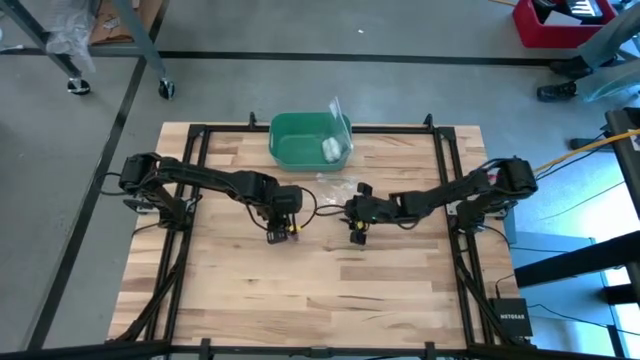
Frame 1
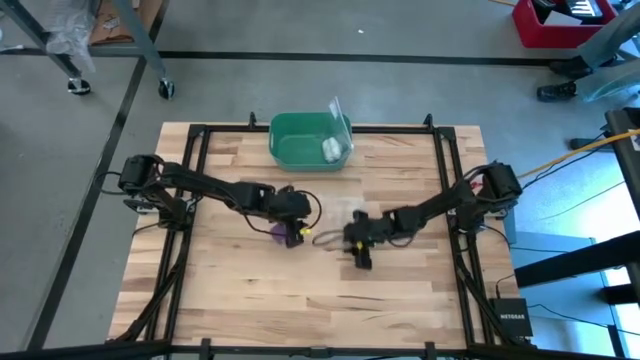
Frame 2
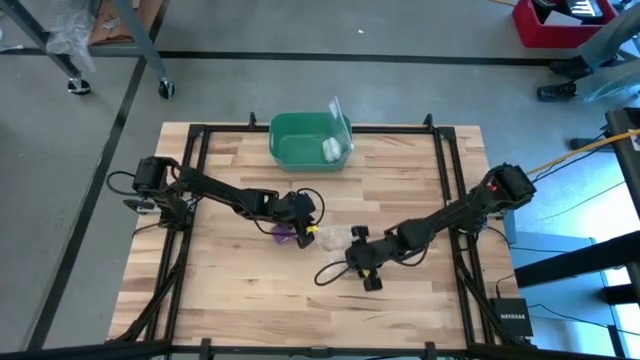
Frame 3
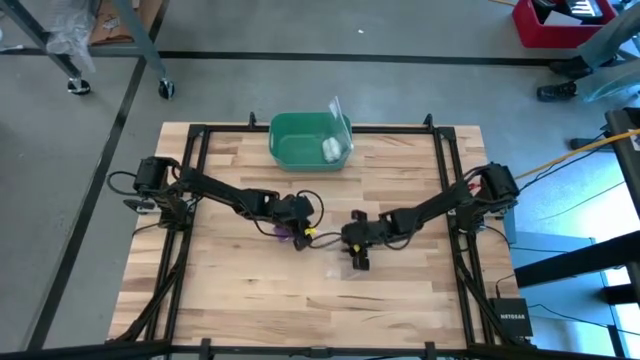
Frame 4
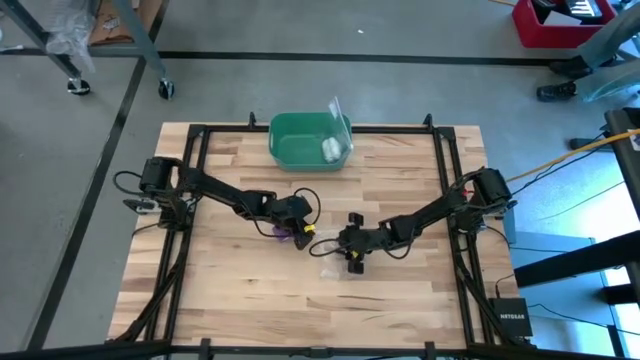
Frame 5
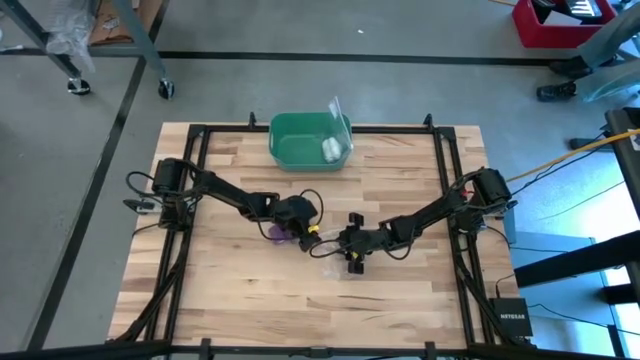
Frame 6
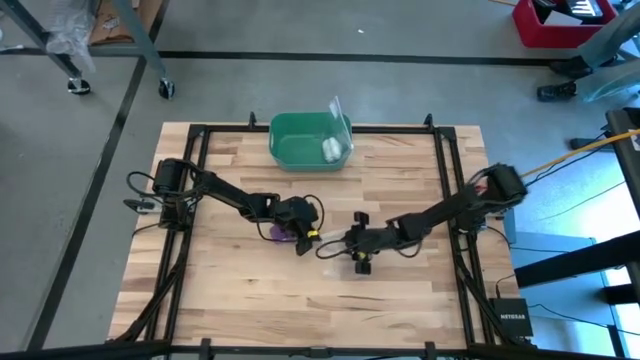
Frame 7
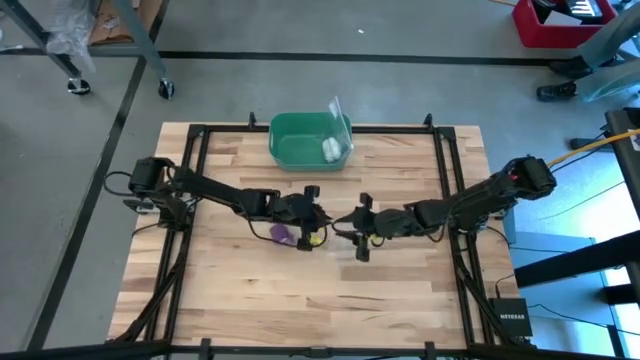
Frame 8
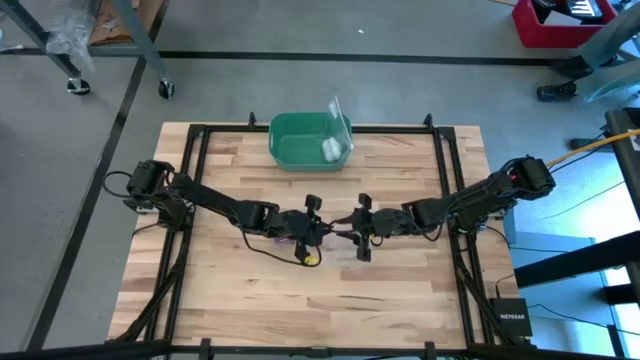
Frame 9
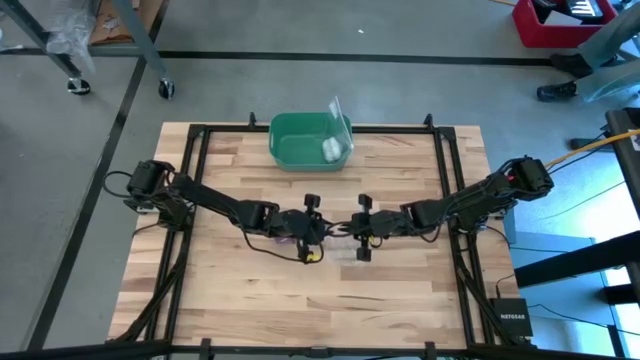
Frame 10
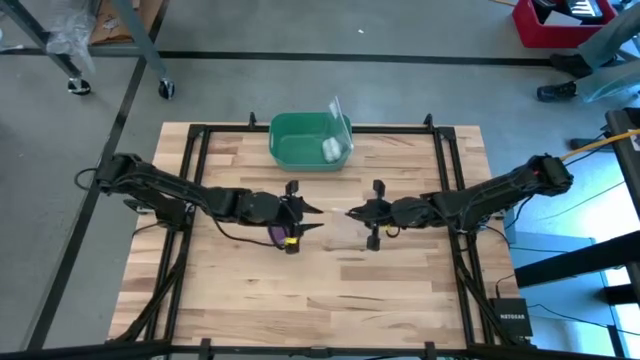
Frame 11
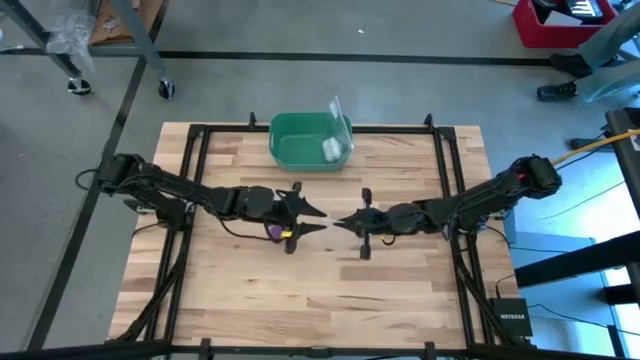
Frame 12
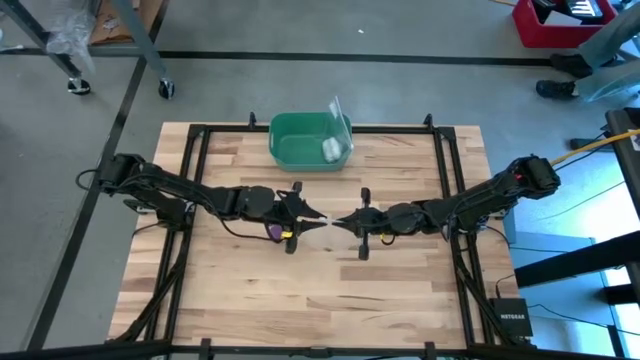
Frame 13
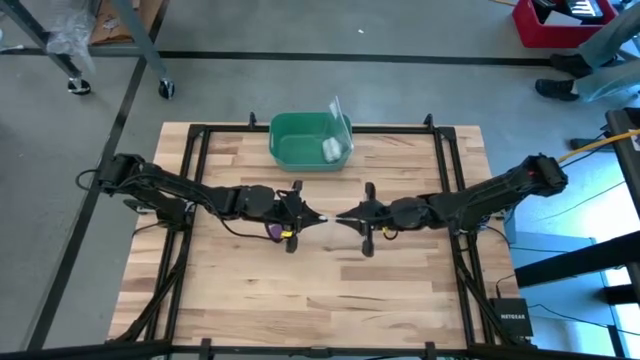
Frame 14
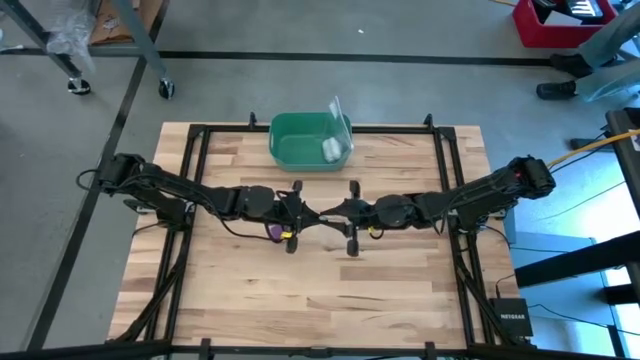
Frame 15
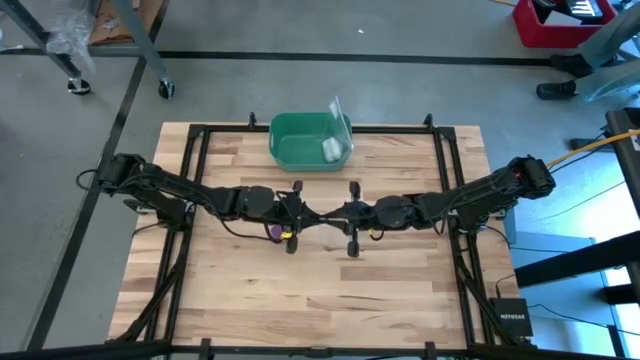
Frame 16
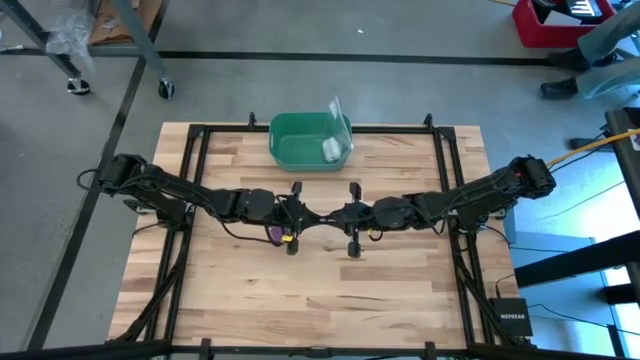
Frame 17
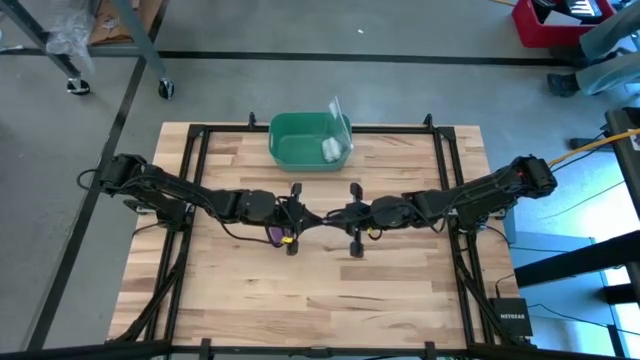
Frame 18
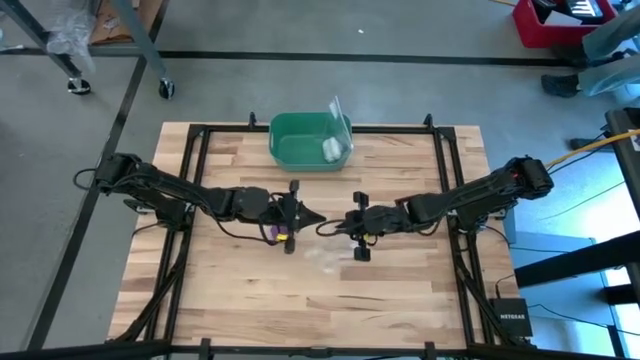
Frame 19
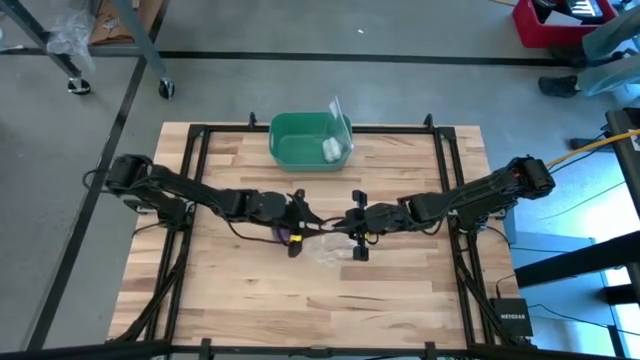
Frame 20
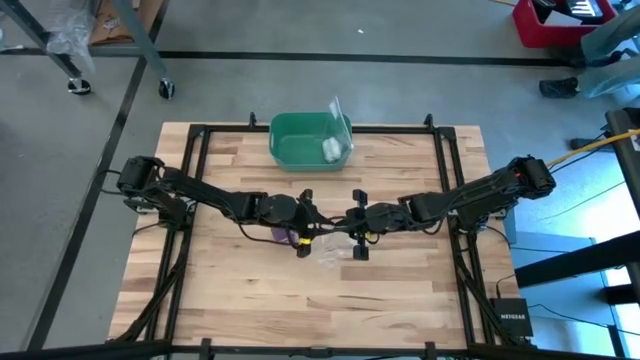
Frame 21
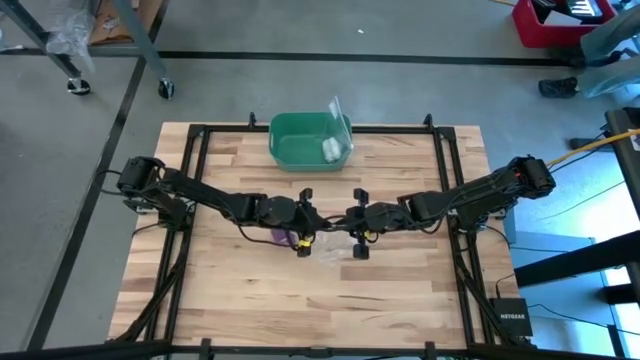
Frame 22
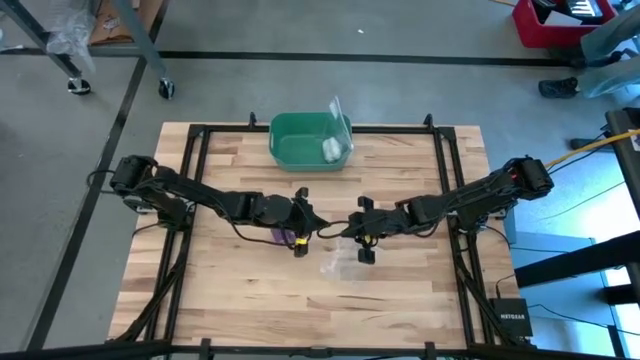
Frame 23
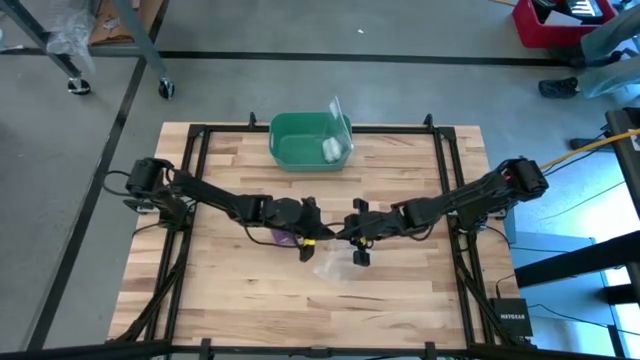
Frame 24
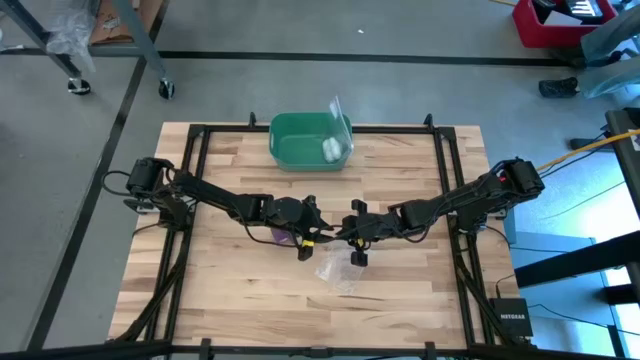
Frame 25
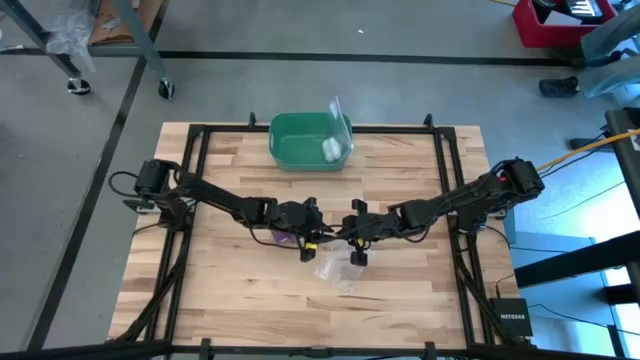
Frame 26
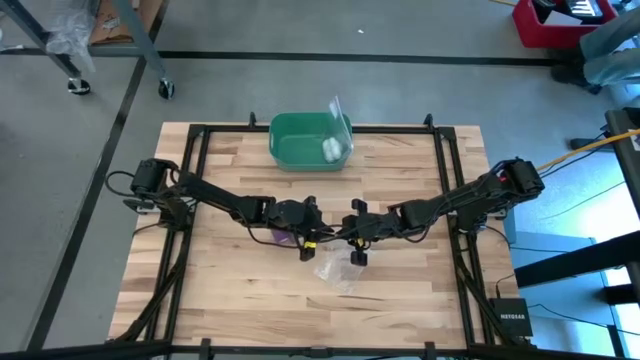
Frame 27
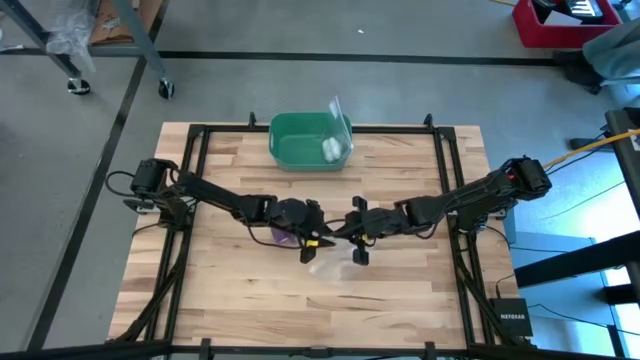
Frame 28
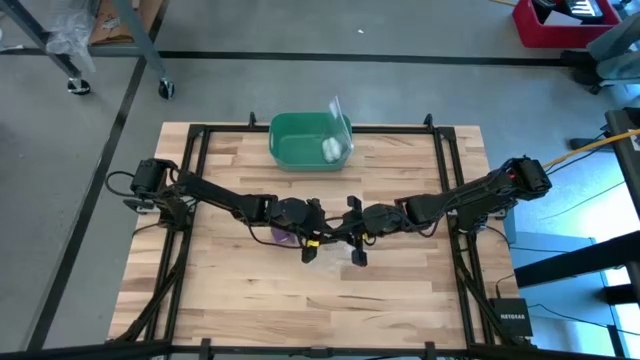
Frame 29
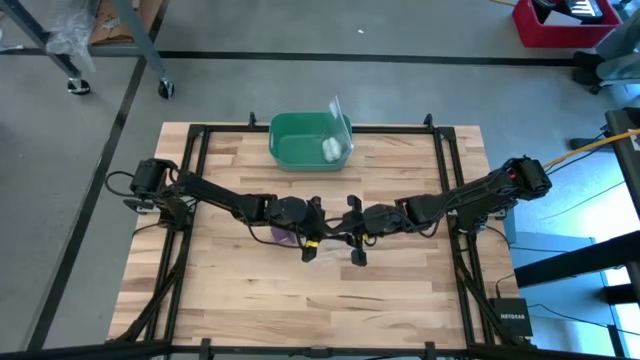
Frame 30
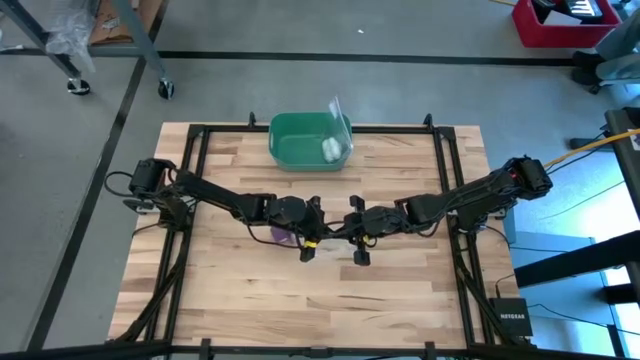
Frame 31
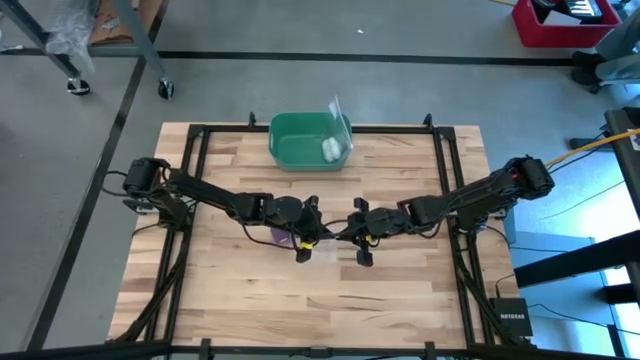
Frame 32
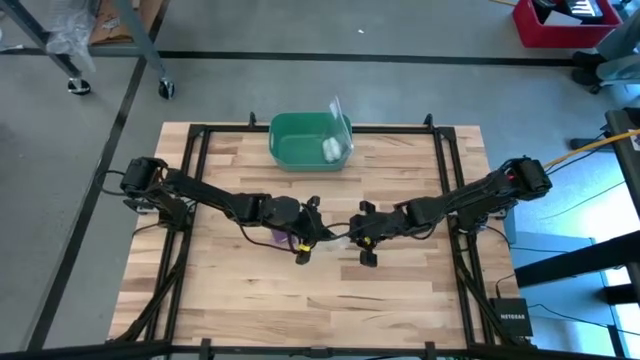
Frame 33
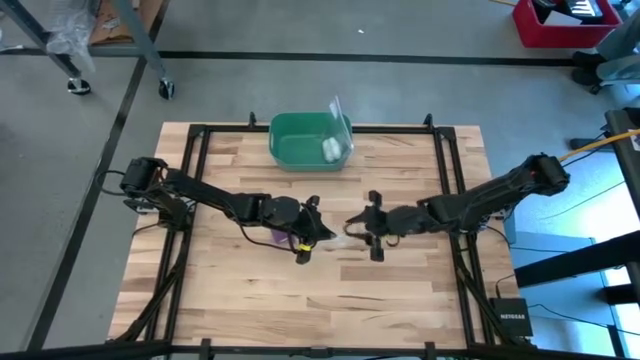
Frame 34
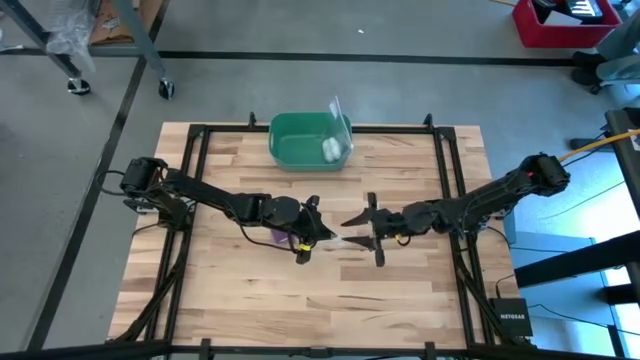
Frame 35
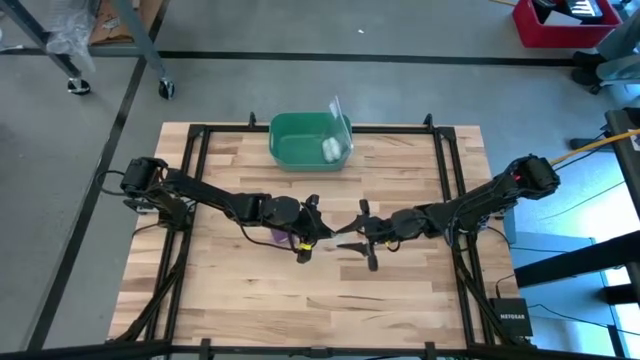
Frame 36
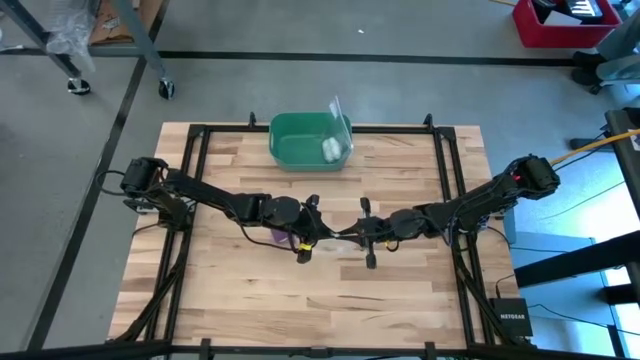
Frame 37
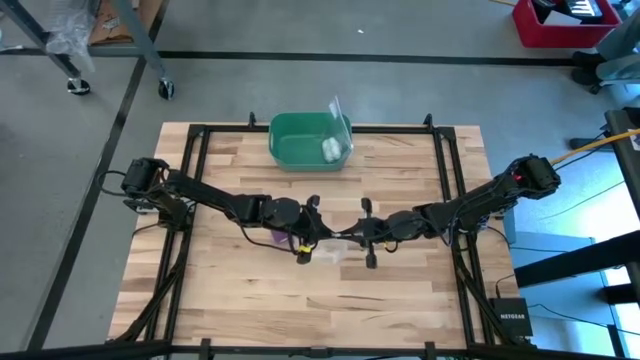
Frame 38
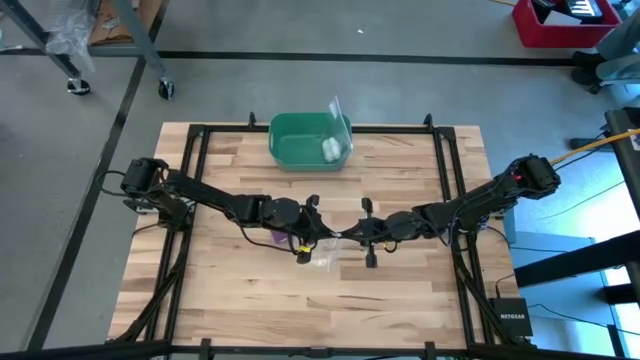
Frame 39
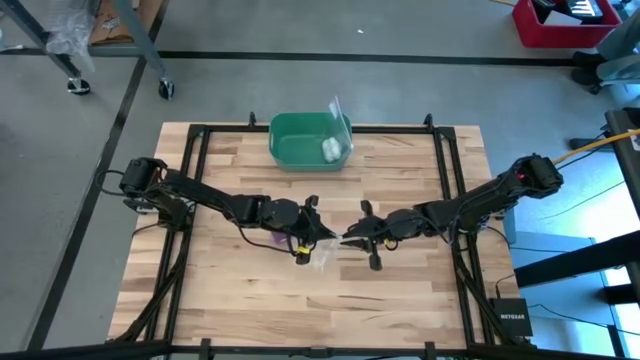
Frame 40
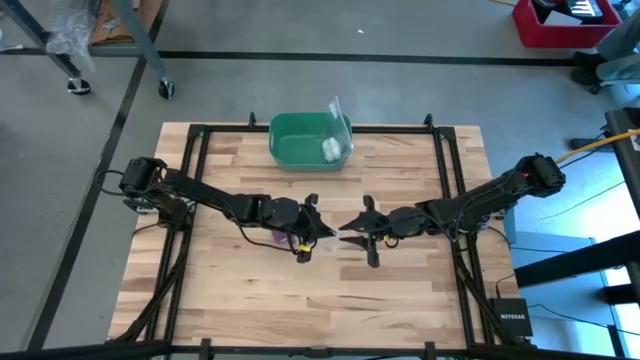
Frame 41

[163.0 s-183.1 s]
Task: Roll bandage
Open the zip bag
